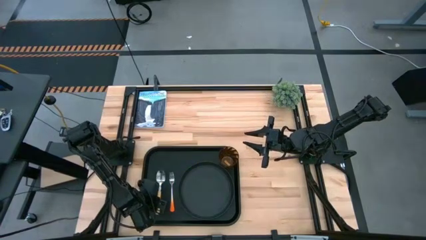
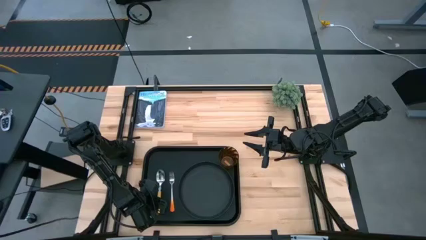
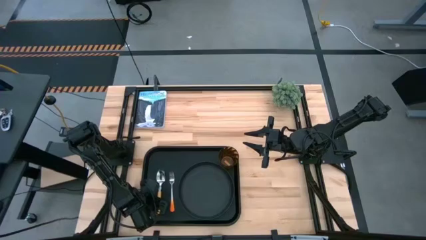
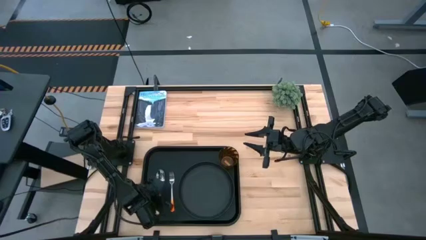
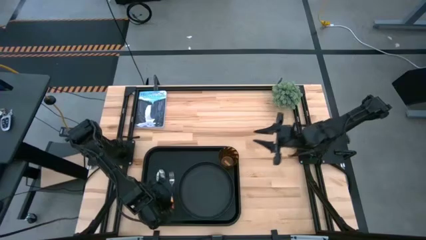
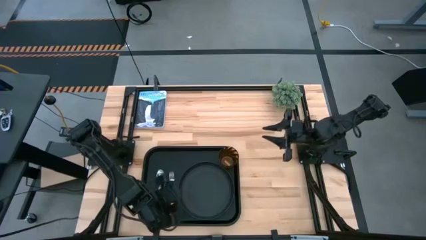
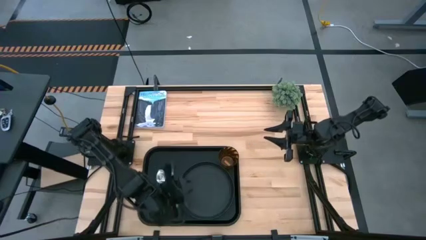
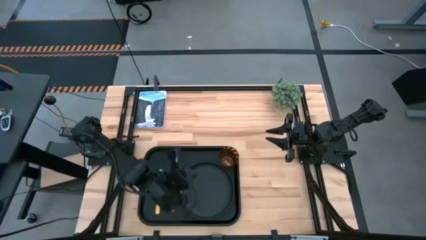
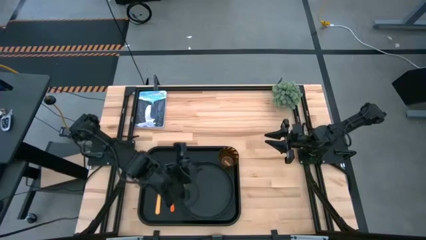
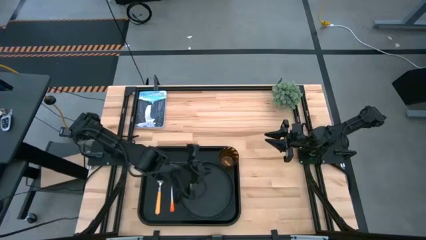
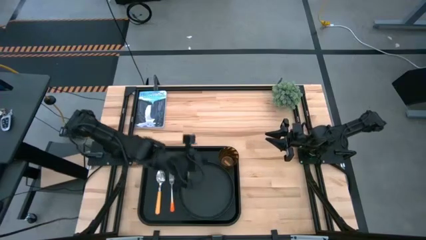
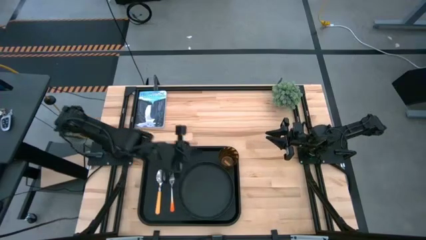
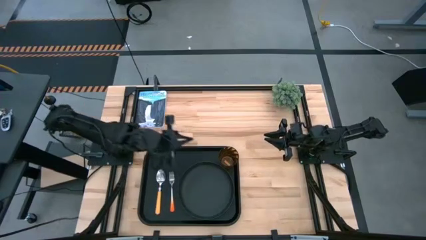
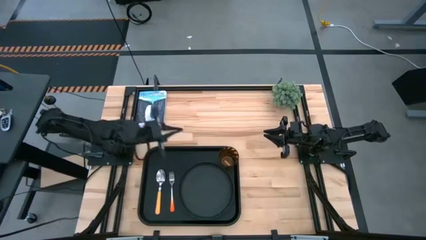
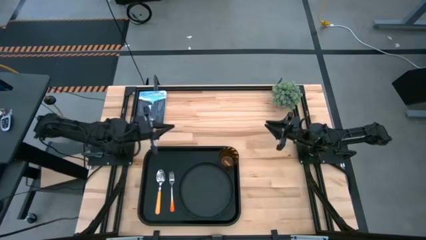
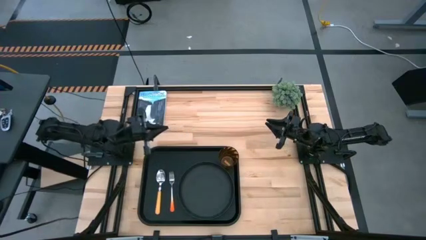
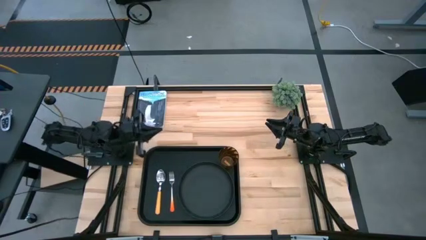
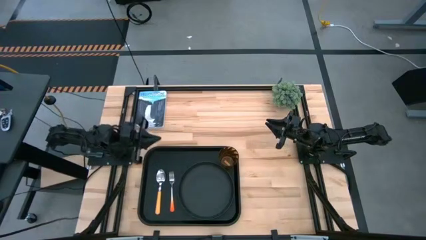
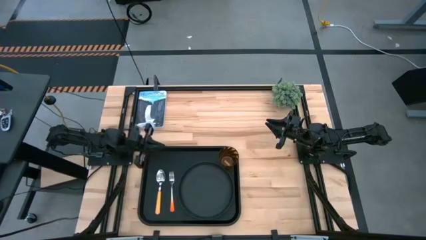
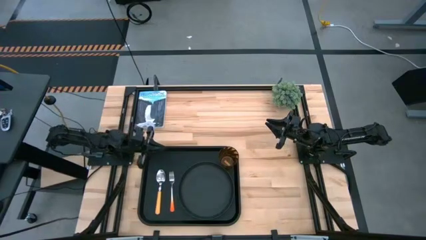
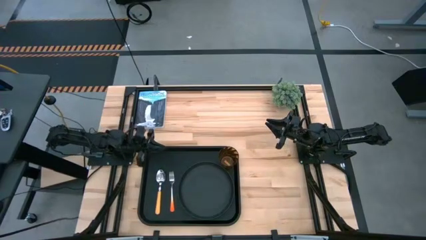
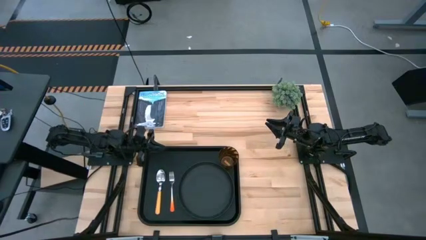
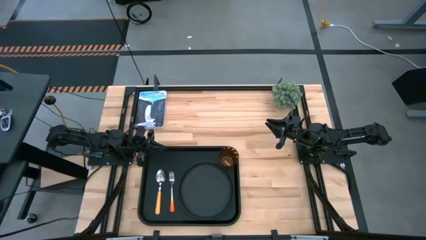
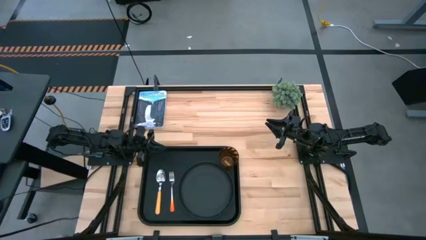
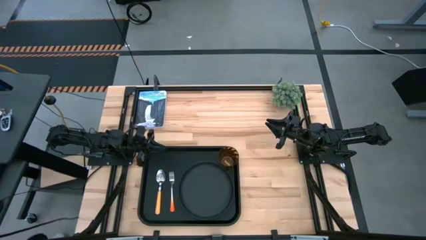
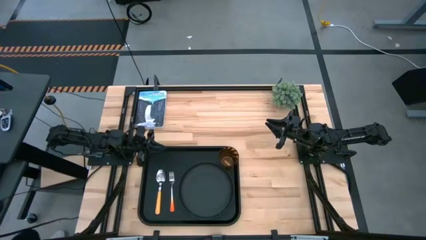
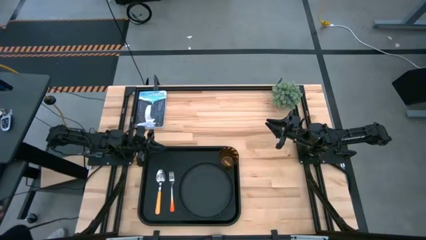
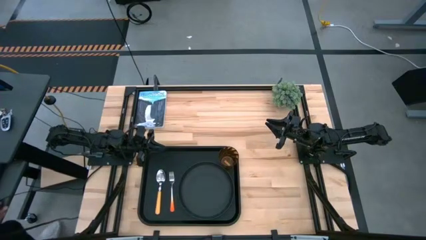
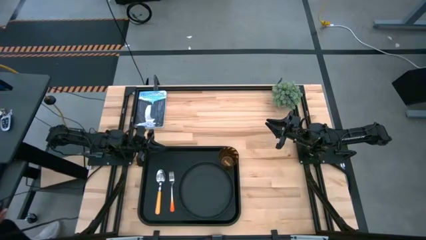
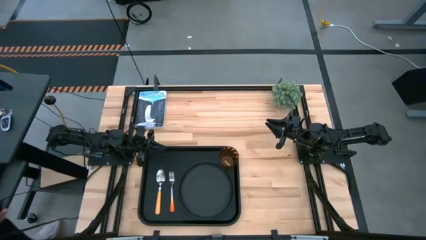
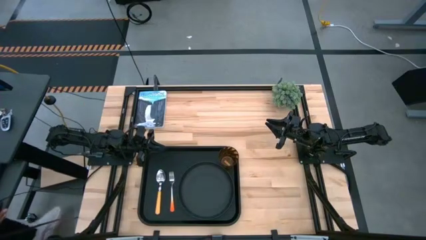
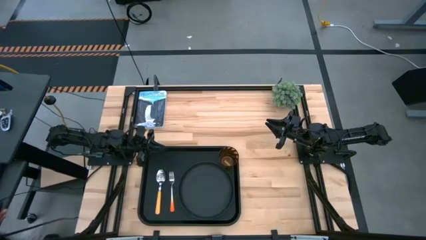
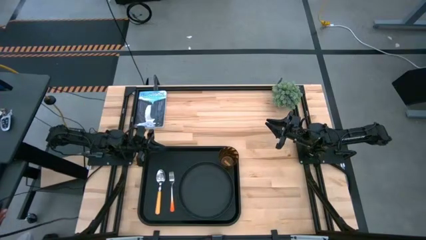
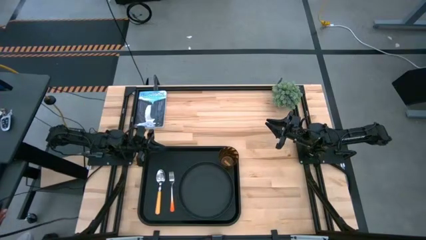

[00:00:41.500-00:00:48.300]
Task: Pick and place plate/cup/fork/spoon on tray
Return to Home Position

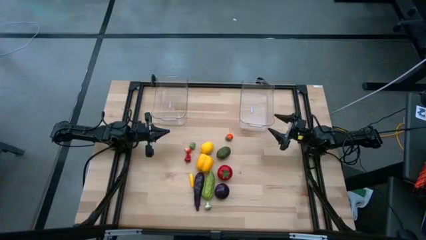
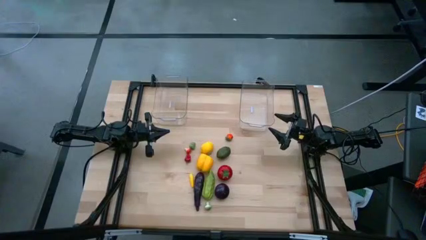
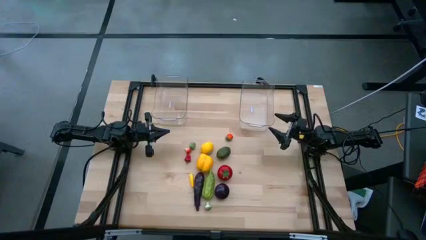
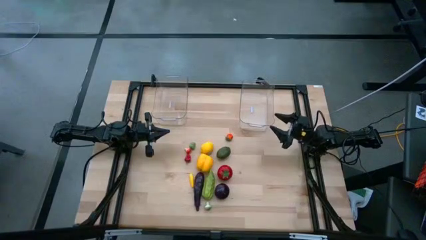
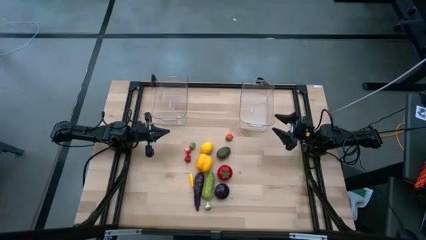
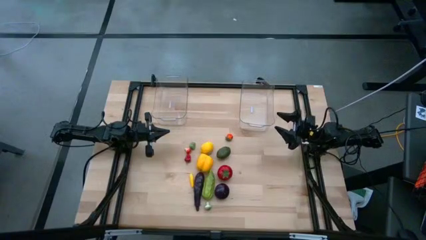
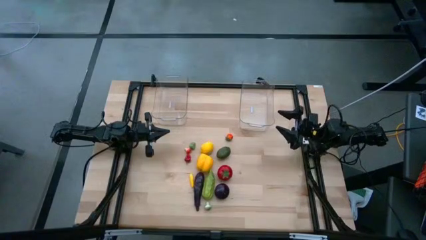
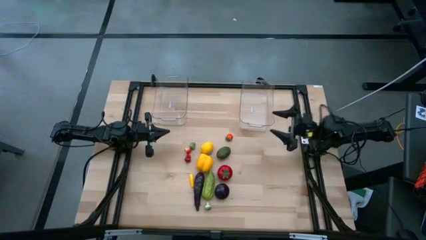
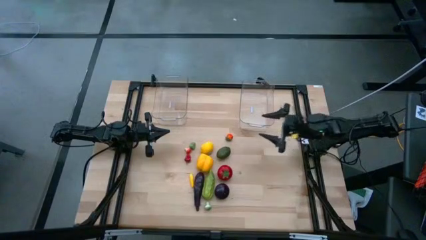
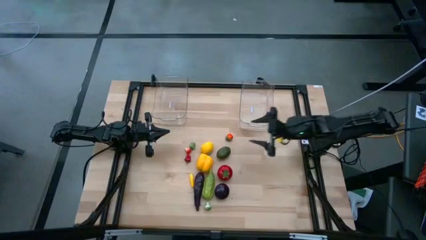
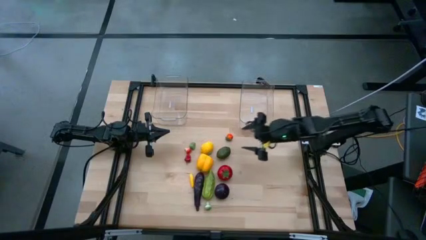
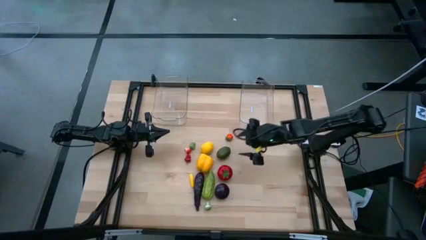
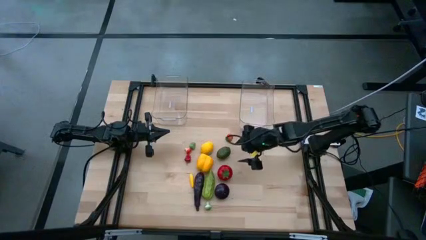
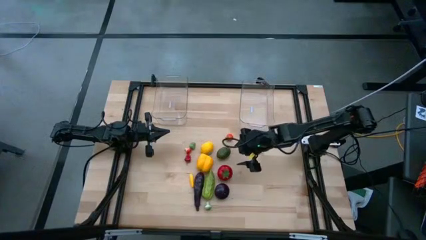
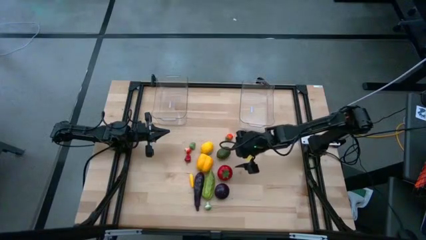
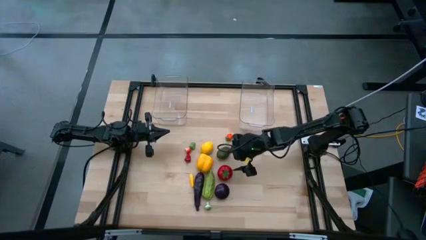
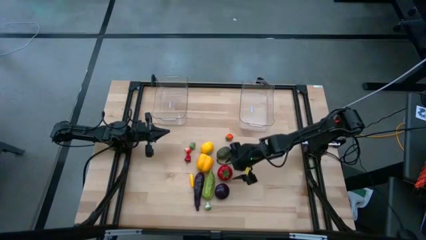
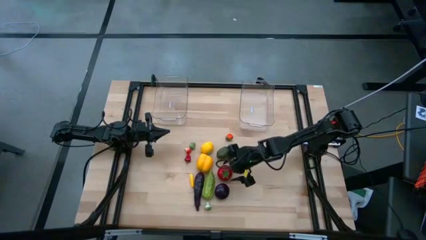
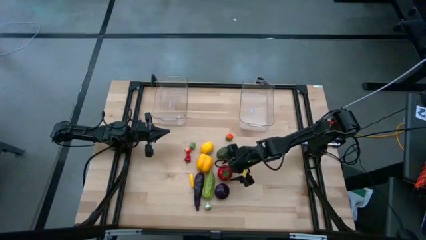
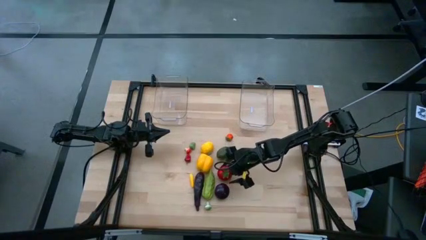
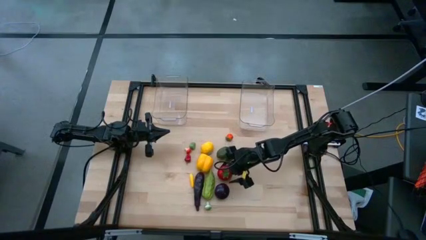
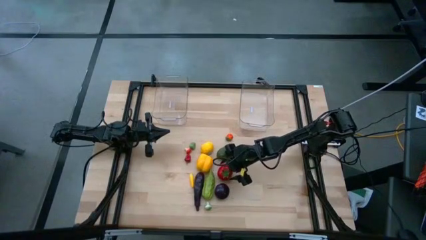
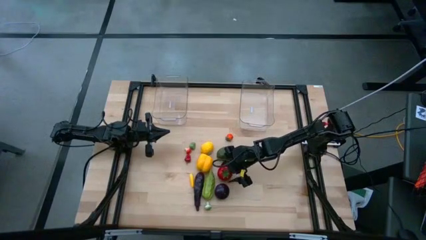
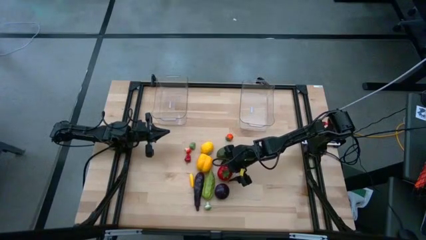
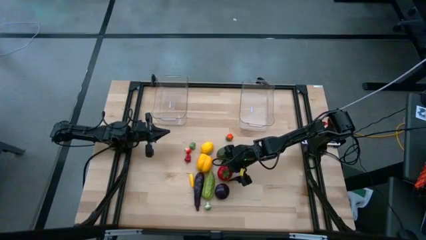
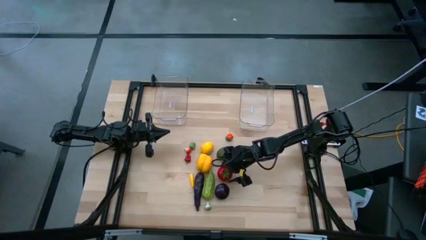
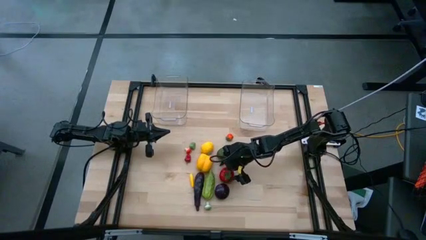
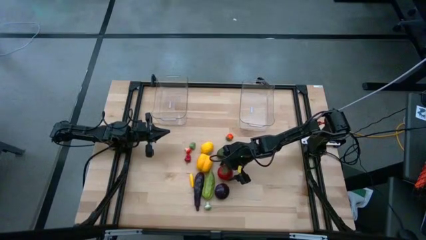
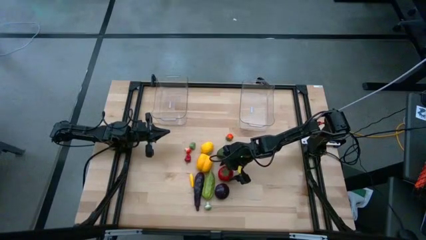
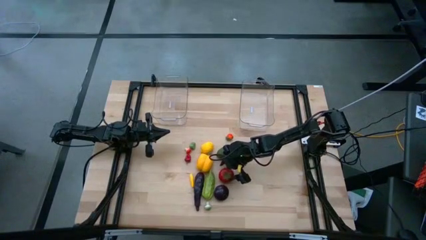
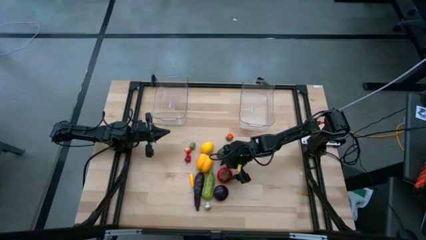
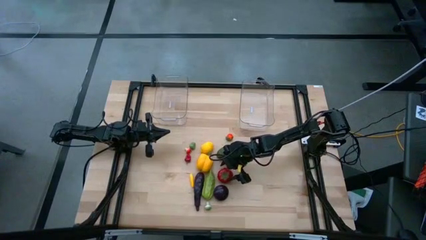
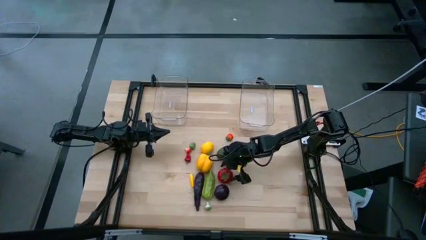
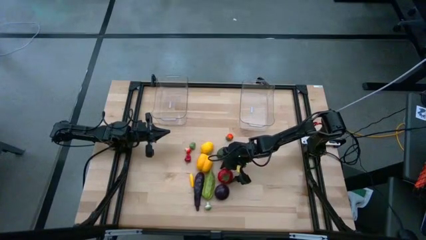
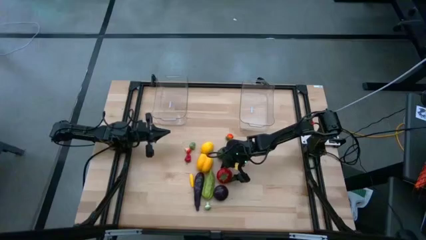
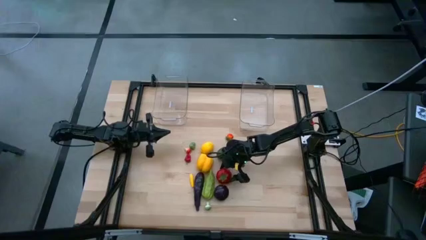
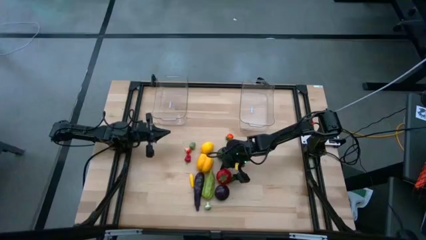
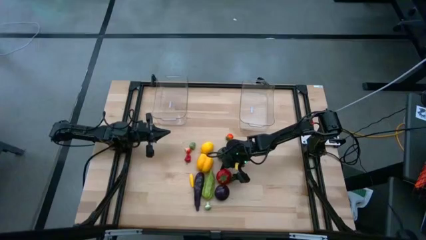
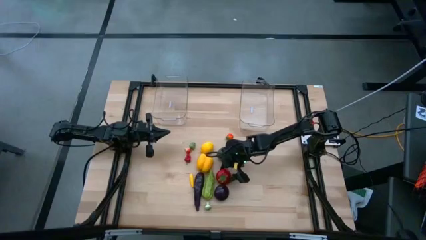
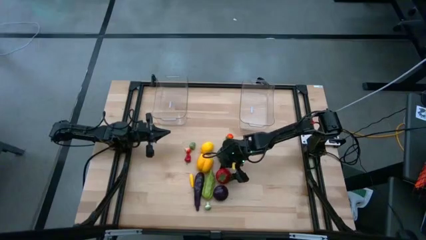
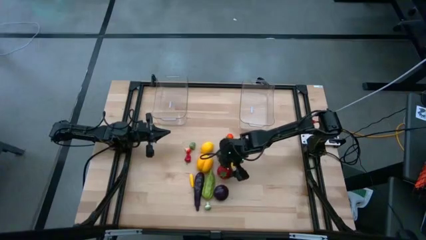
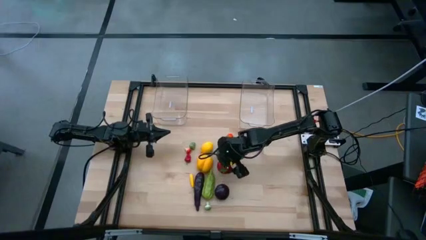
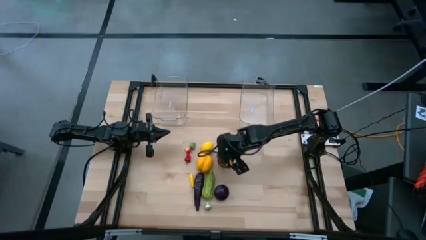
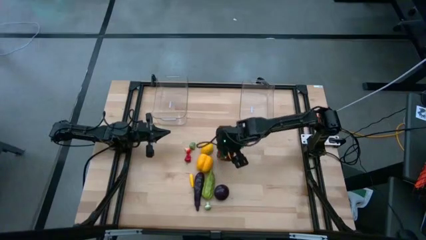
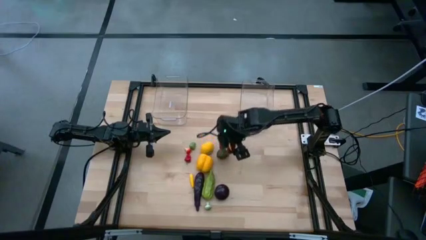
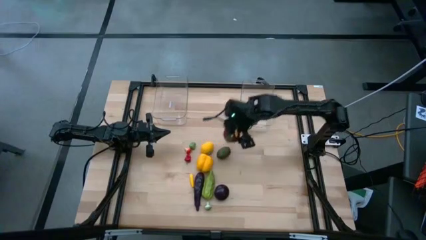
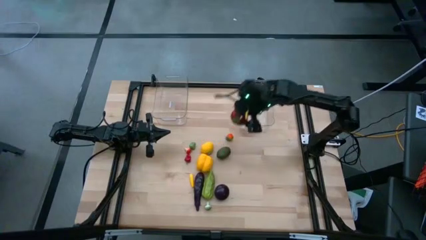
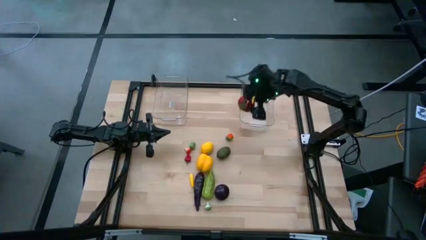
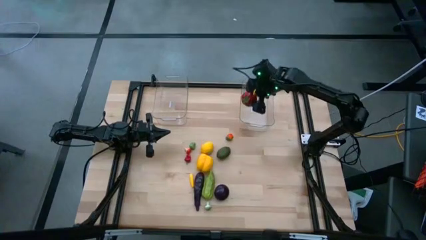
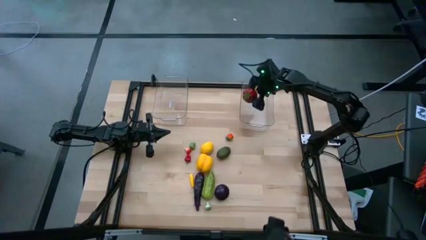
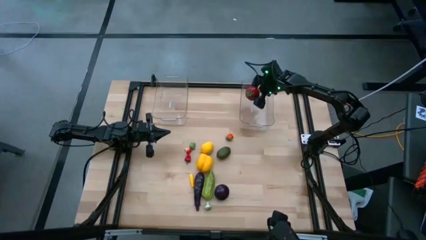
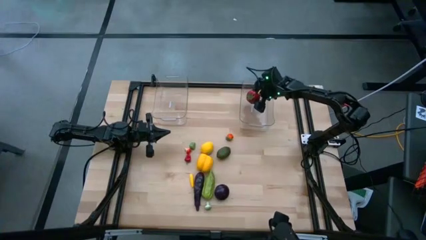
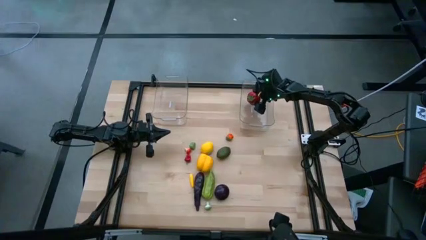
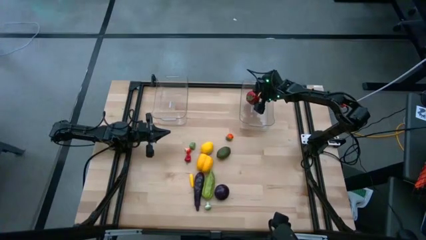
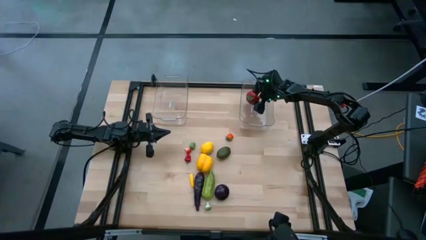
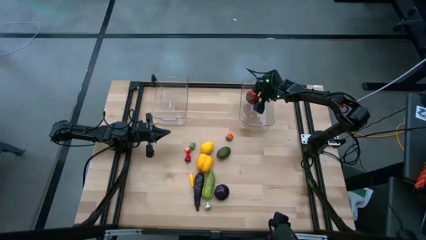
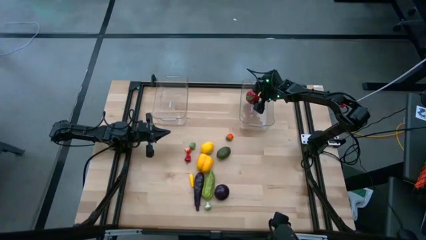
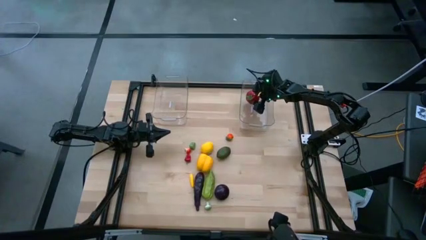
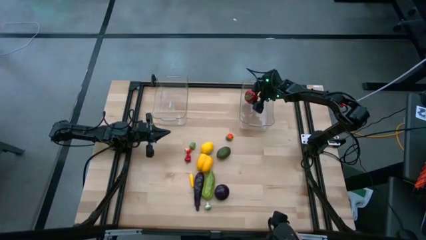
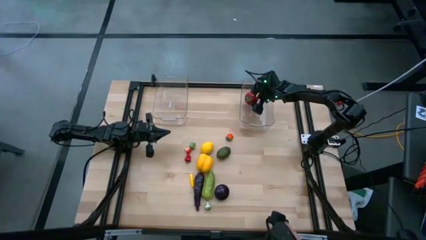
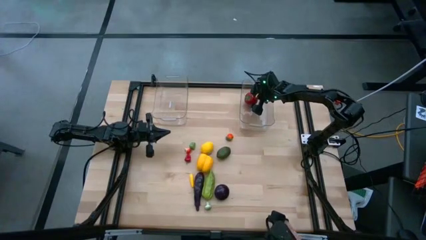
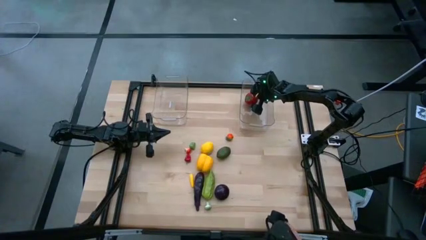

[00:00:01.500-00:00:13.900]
Task: Sort produce into baskets
Put the red tomato into the right transparent bin
